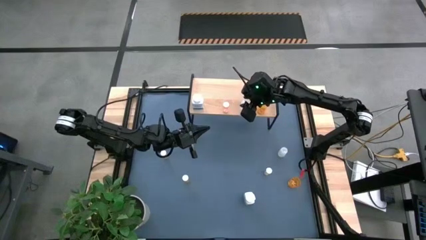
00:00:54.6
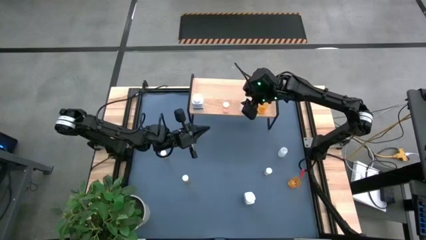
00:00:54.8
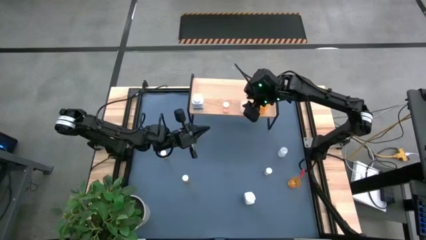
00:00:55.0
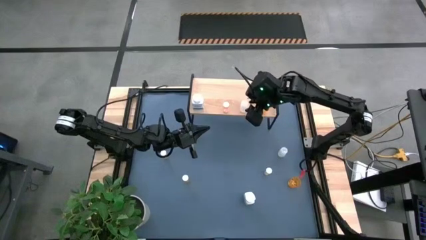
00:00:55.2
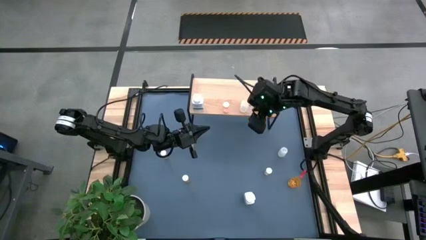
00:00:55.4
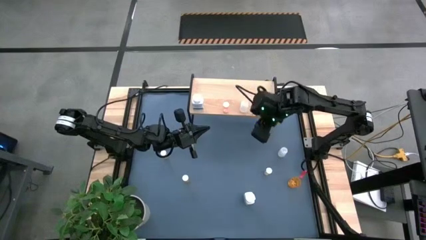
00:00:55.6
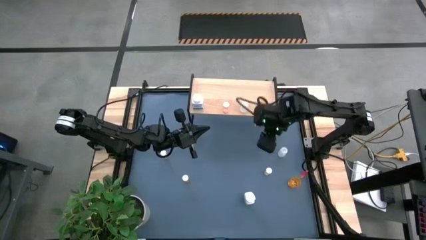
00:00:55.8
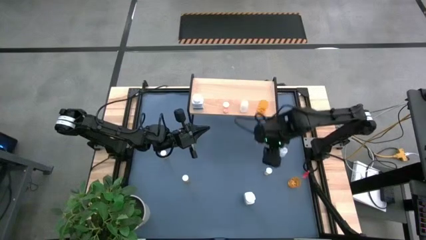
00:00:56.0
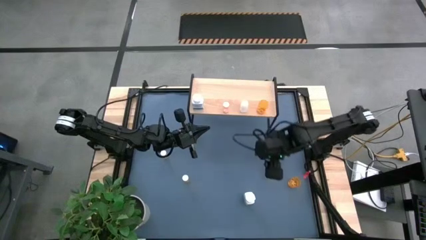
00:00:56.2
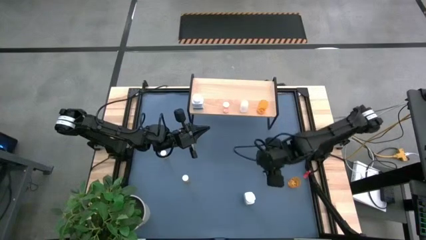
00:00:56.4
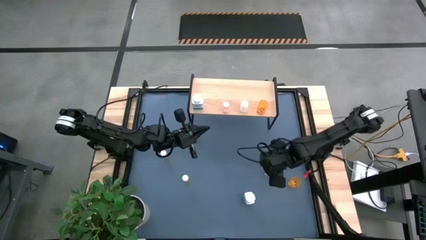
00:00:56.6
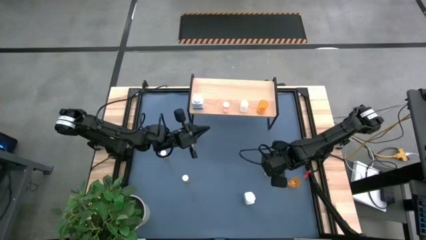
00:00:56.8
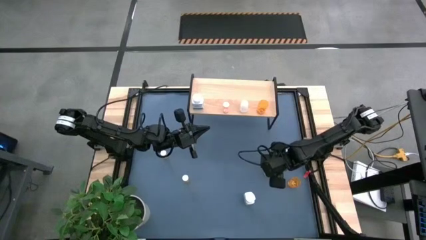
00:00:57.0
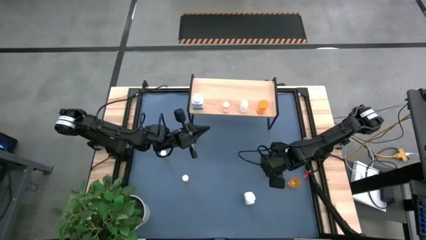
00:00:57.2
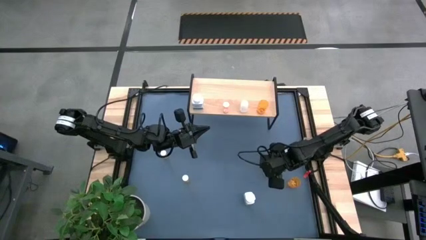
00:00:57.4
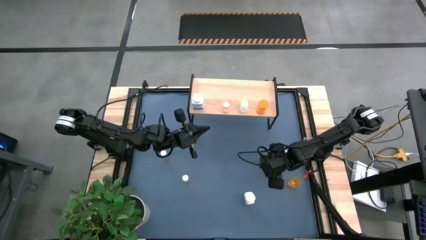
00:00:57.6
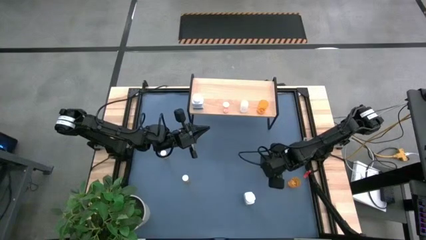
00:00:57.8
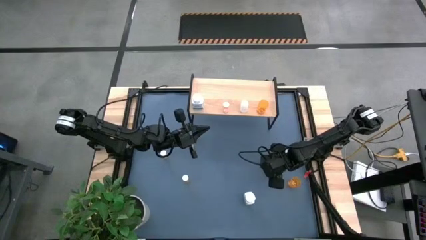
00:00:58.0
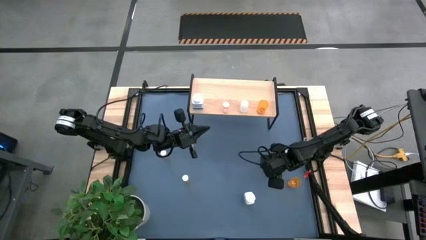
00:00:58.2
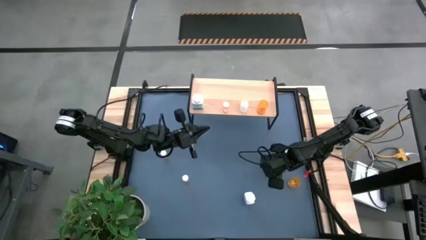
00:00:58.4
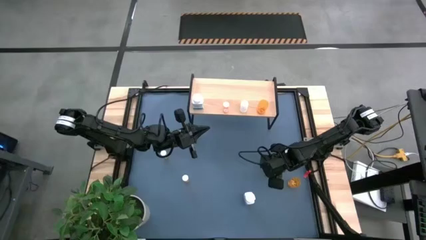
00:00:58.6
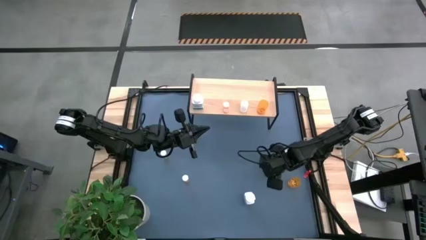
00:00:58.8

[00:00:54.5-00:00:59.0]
Task: Pick and place medicine bottles onto shelf by color
Put the right yellow pill bottle on the shelf

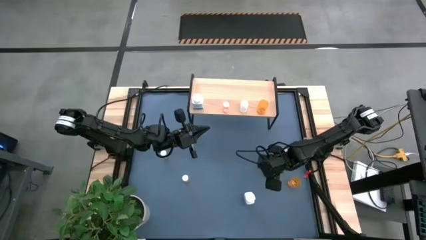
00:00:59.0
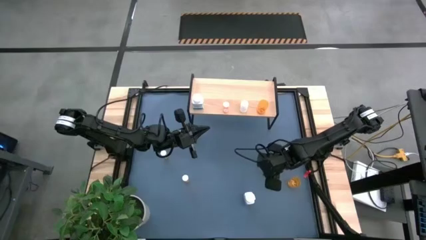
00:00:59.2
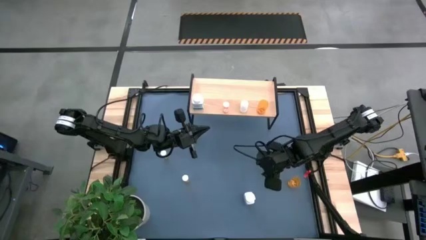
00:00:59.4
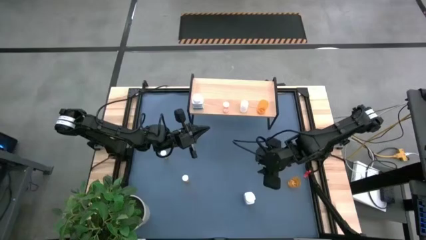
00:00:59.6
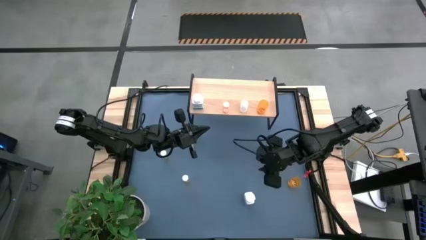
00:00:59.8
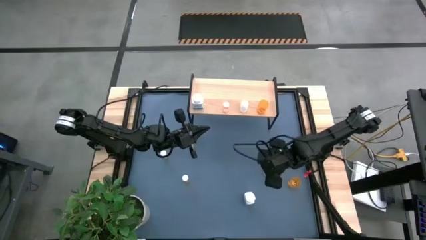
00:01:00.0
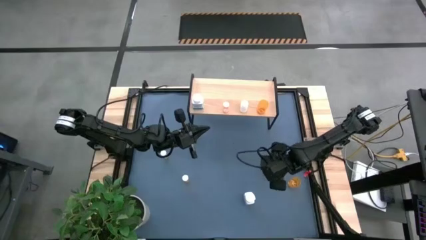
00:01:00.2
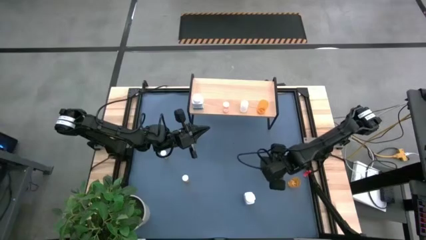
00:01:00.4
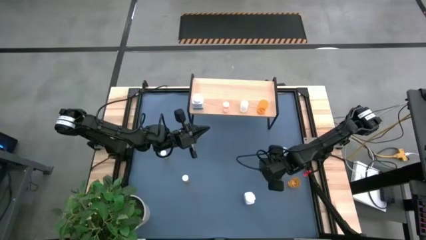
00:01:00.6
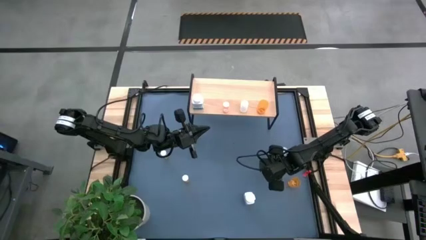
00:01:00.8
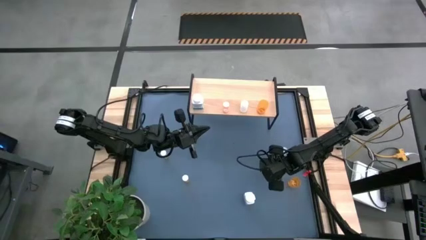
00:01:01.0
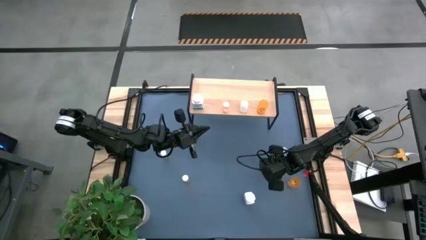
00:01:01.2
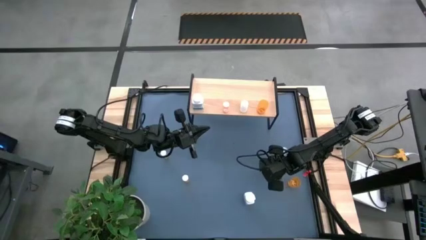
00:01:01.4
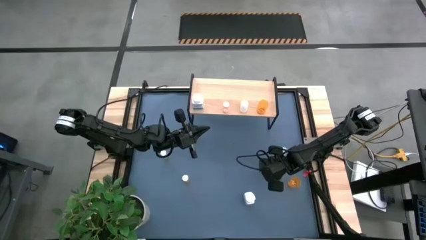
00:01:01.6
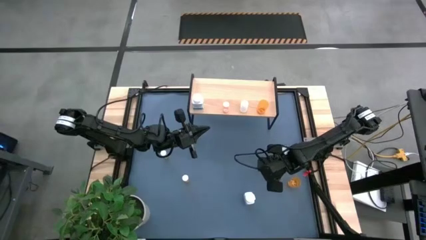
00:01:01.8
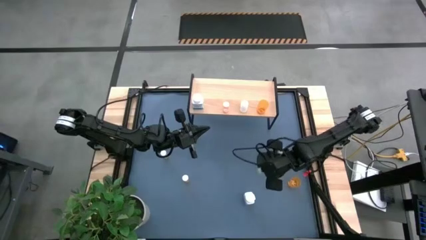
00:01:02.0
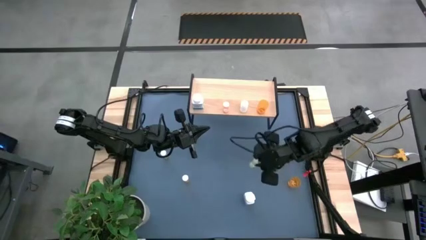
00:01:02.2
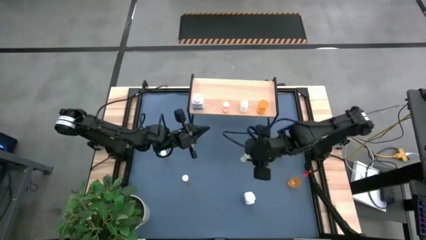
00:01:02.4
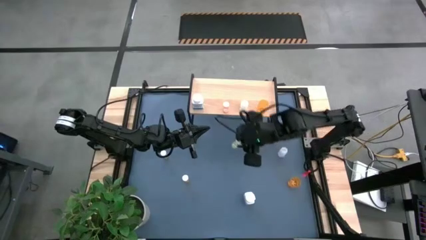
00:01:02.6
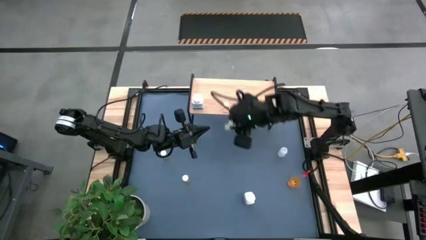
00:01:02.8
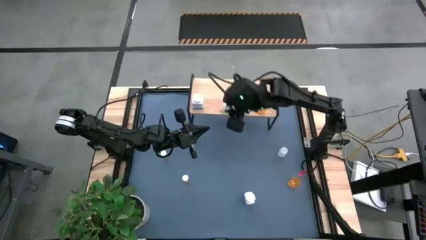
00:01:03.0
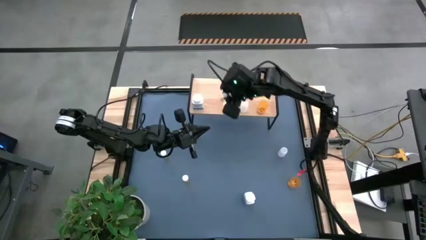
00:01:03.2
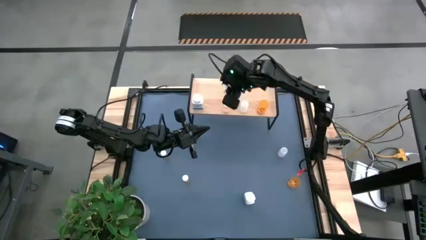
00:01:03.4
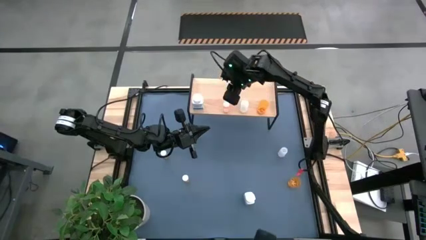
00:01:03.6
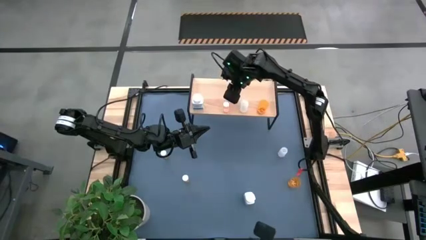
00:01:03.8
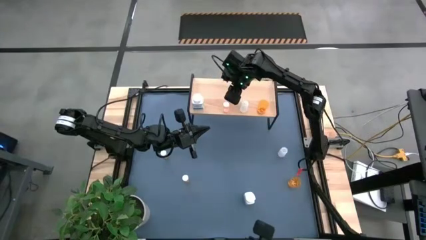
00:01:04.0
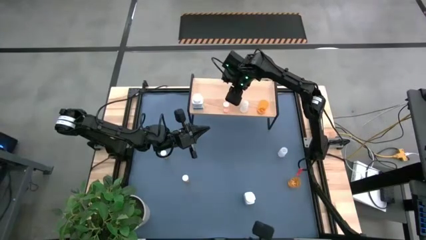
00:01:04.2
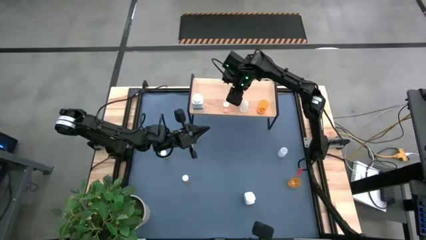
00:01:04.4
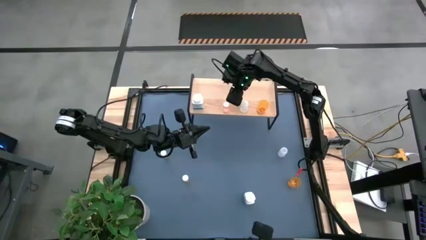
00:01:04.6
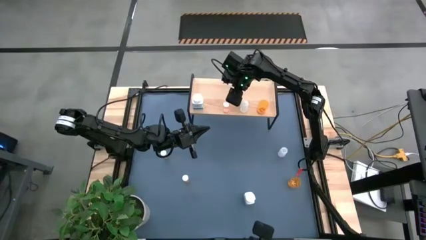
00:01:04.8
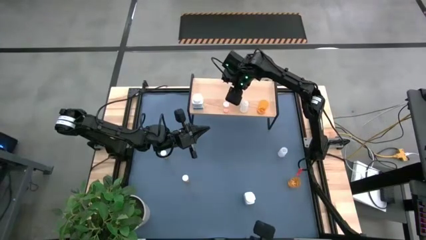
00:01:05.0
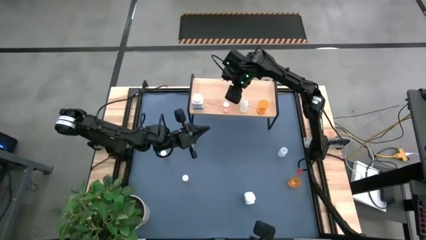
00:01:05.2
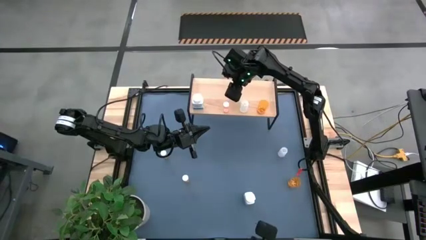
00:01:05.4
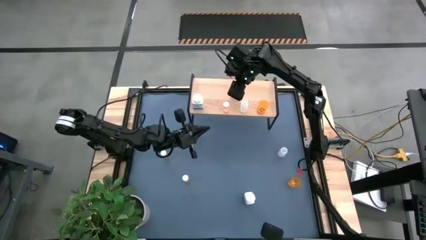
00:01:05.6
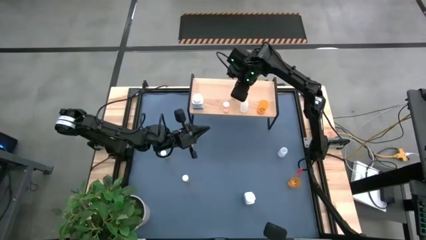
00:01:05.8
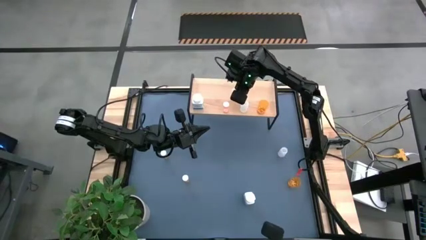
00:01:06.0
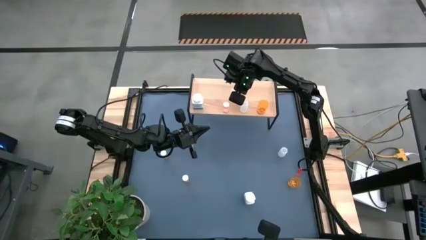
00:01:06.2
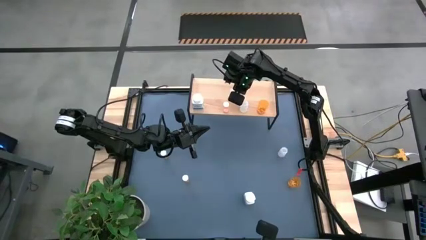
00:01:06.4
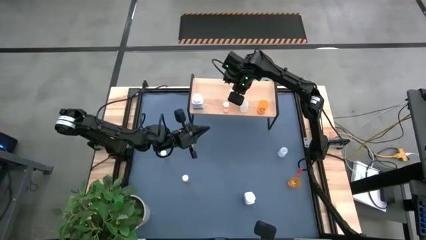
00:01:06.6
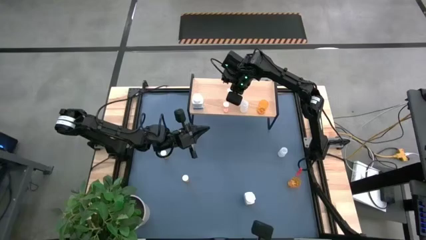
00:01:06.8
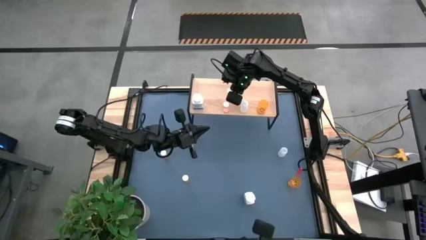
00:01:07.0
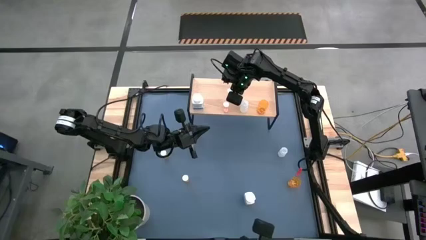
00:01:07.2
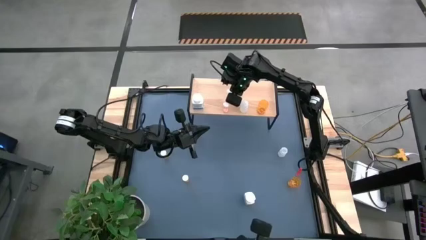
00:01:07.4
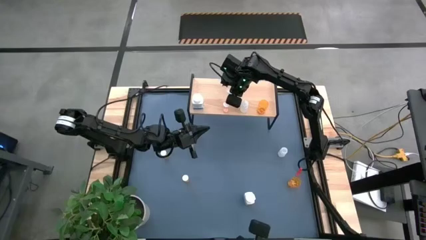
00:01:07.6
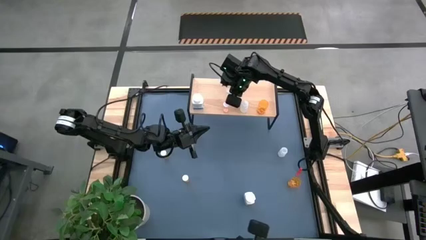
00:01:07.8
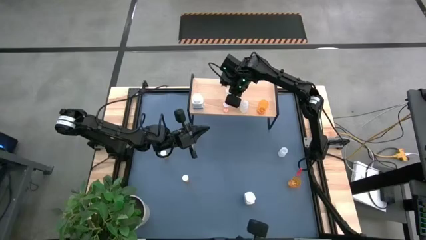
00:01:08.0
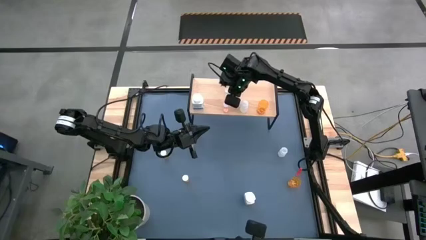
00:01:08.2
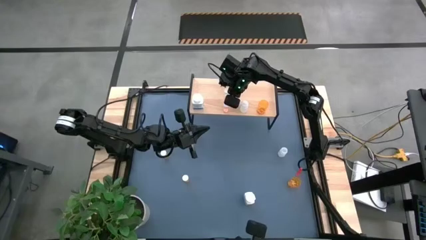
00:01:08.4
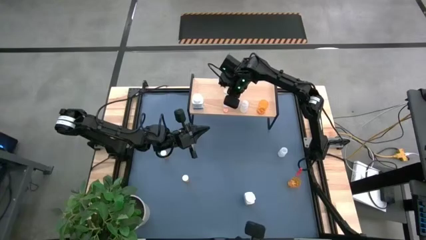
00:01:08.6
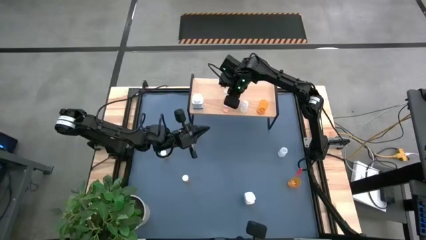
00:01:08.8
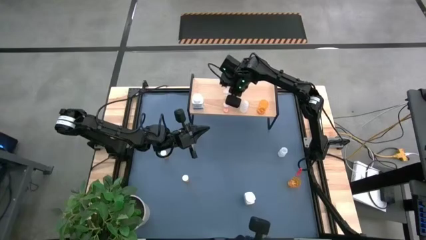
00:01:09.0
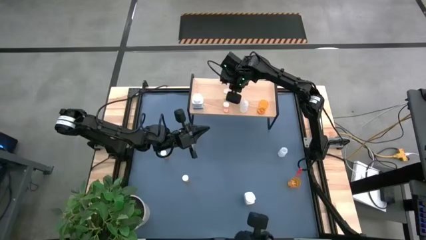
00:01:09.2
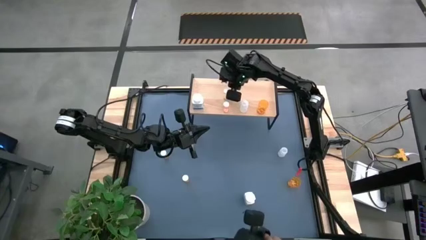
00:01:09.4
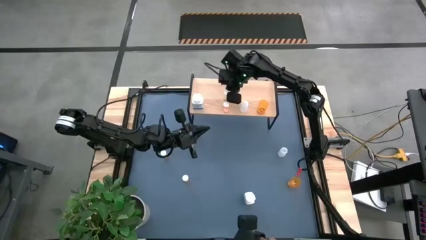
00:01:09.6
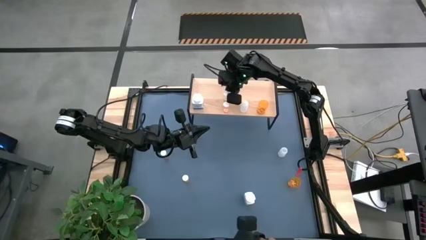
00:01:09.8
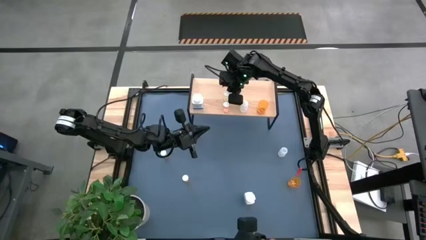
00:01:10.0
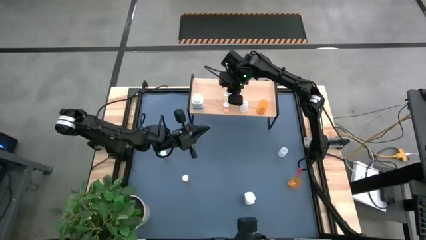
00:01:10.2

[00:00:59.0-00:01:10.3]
Put the right yellow pill bottle on the shelf
